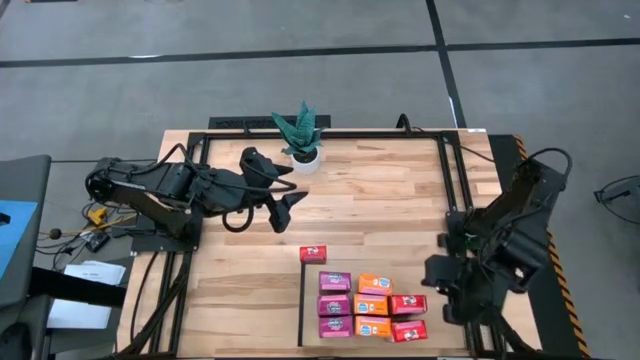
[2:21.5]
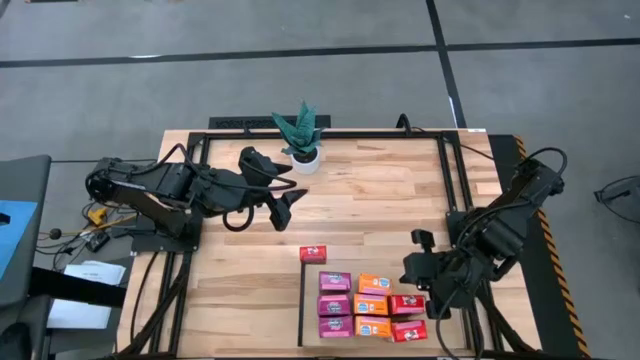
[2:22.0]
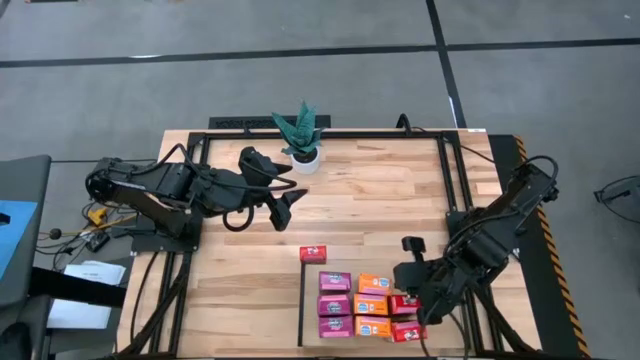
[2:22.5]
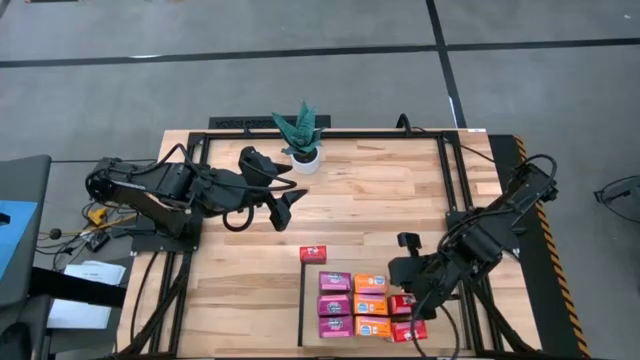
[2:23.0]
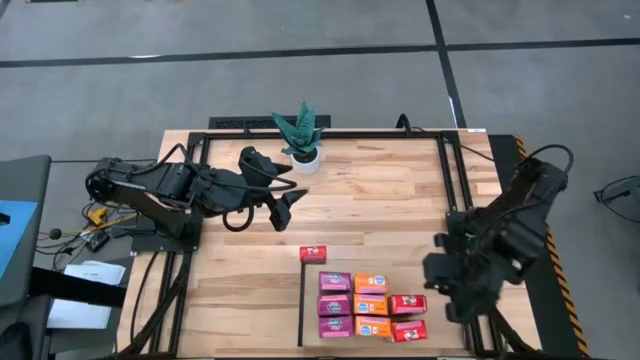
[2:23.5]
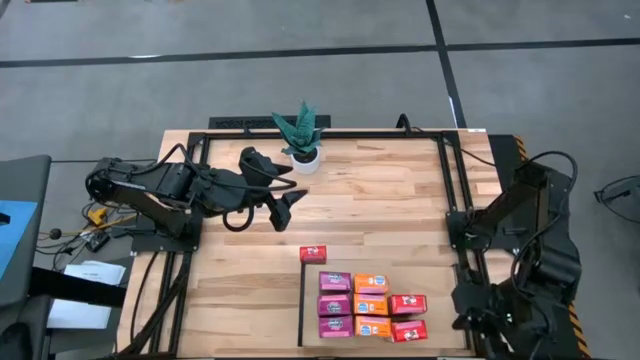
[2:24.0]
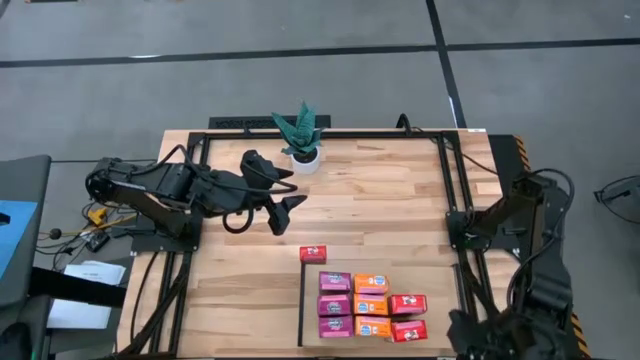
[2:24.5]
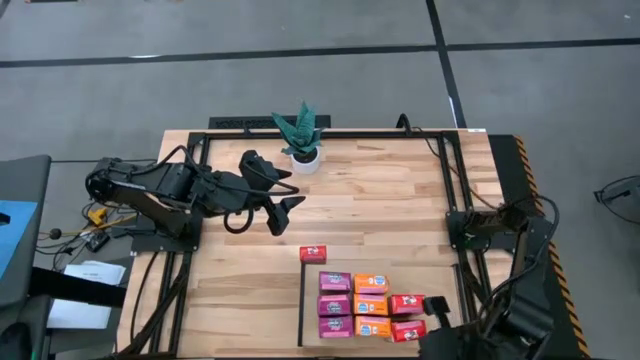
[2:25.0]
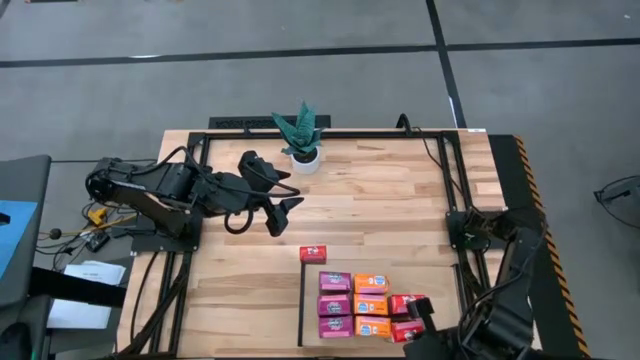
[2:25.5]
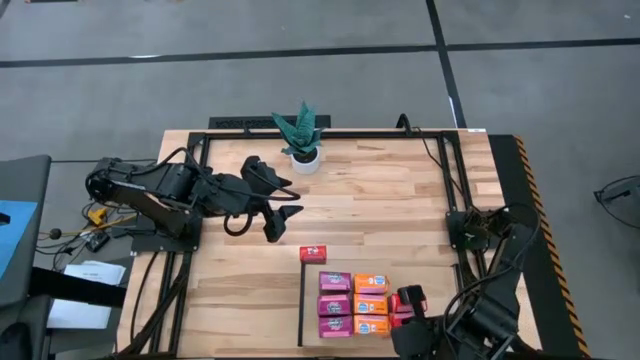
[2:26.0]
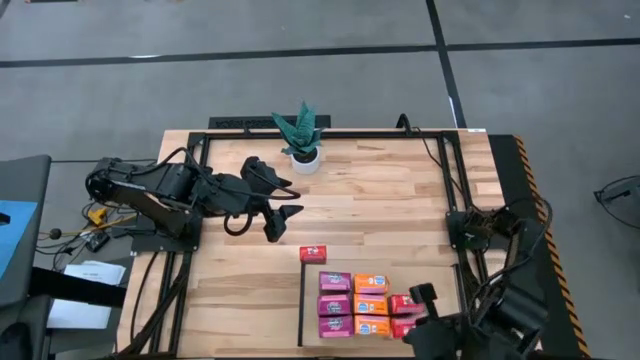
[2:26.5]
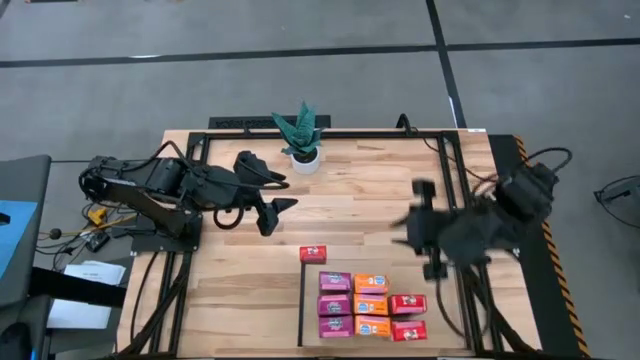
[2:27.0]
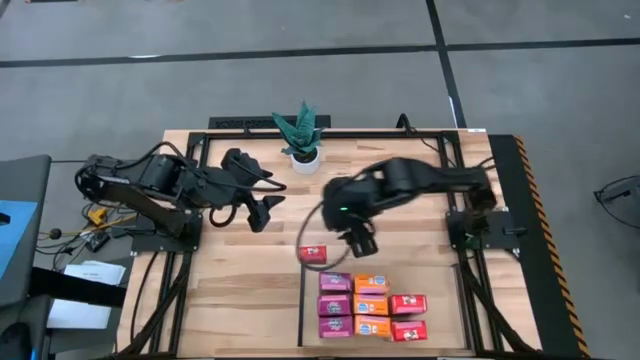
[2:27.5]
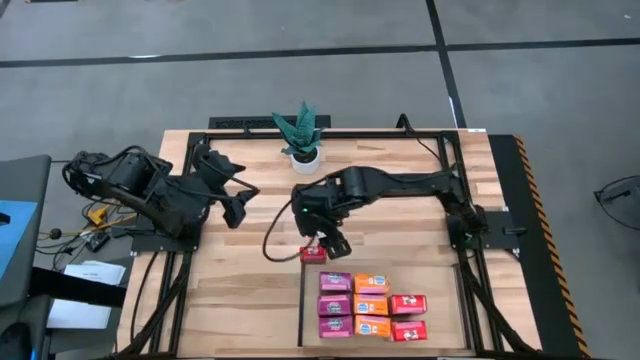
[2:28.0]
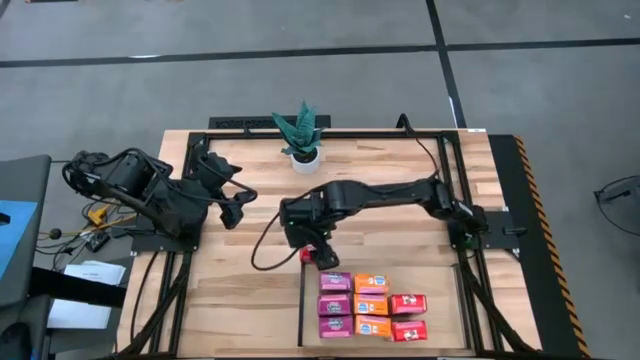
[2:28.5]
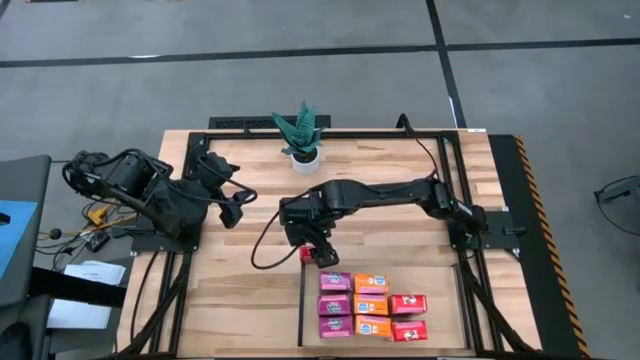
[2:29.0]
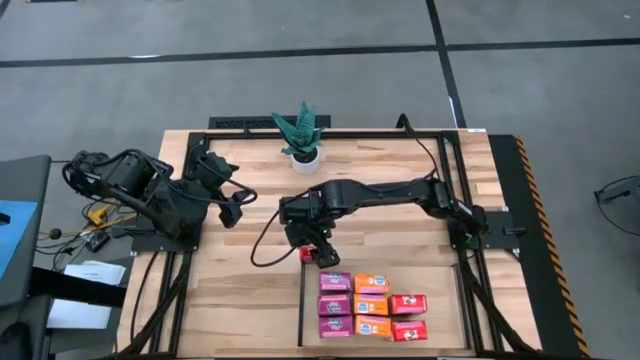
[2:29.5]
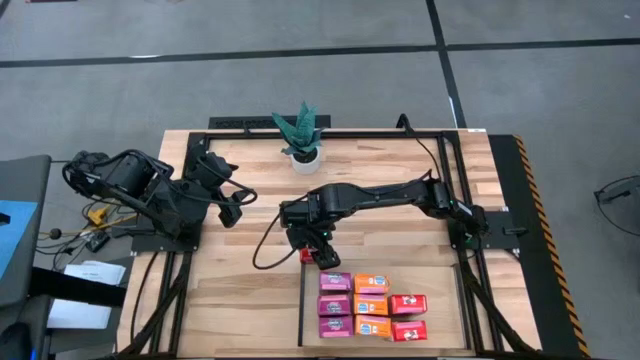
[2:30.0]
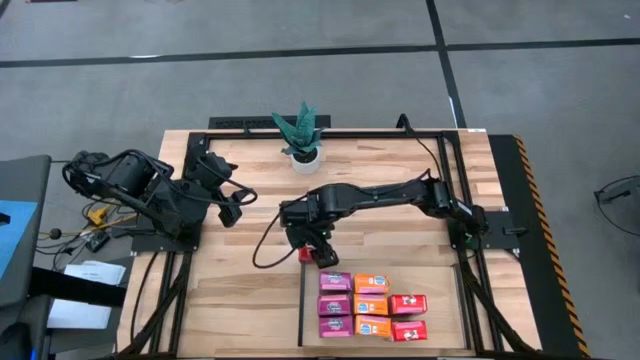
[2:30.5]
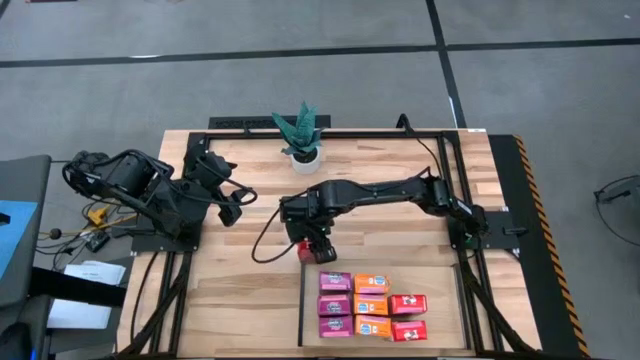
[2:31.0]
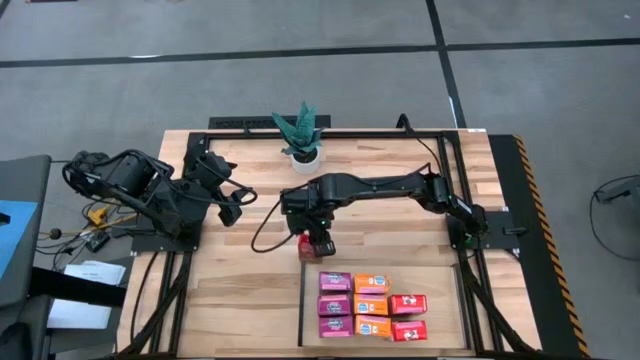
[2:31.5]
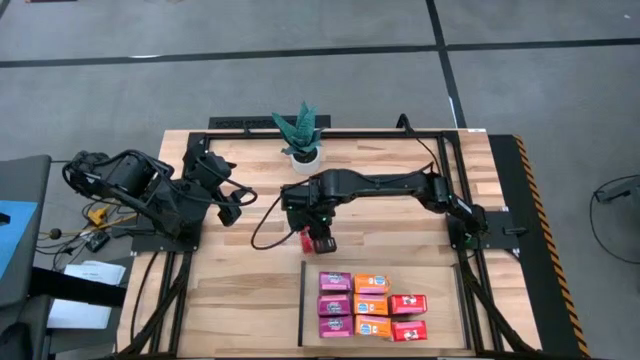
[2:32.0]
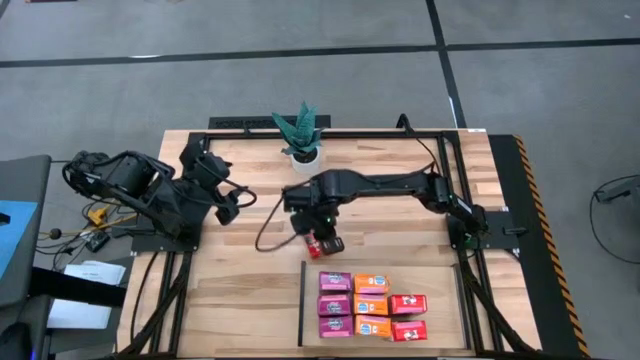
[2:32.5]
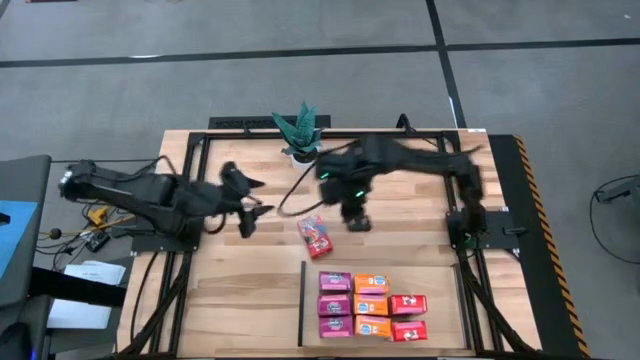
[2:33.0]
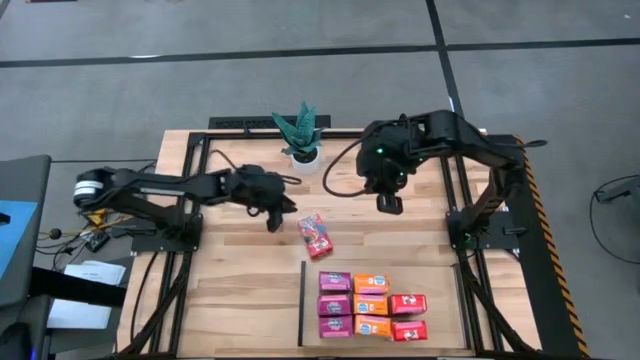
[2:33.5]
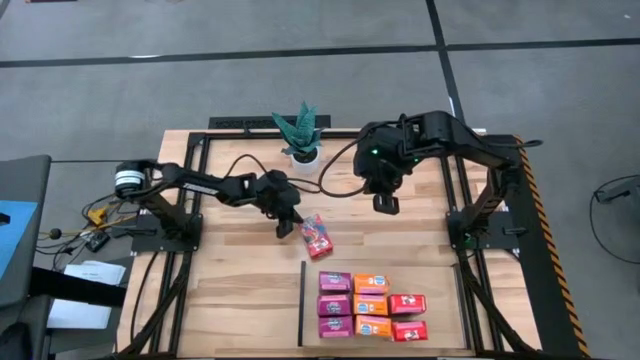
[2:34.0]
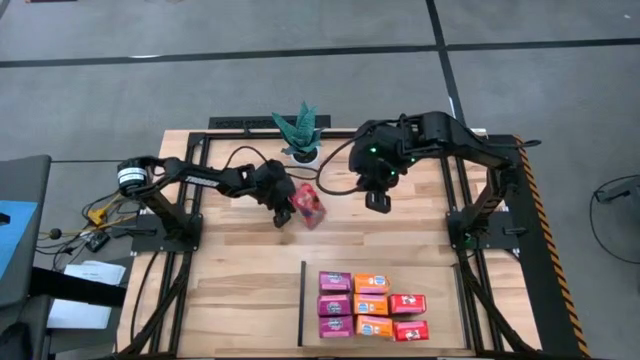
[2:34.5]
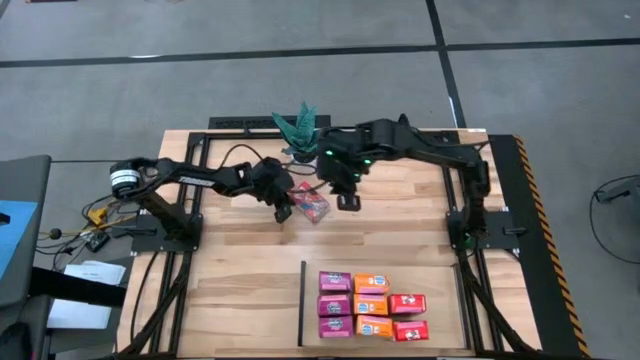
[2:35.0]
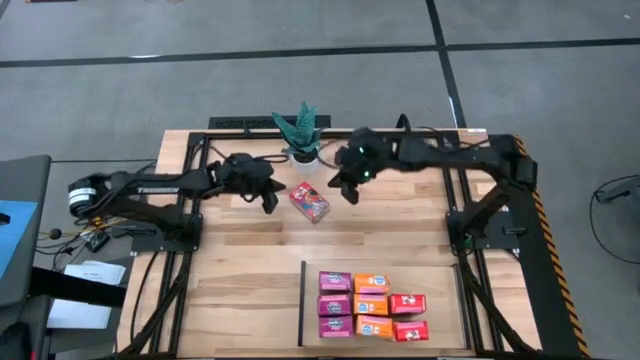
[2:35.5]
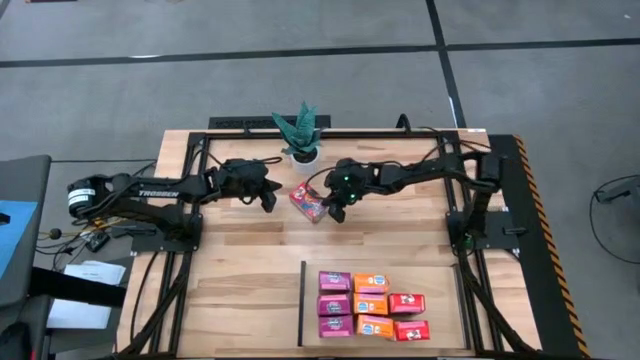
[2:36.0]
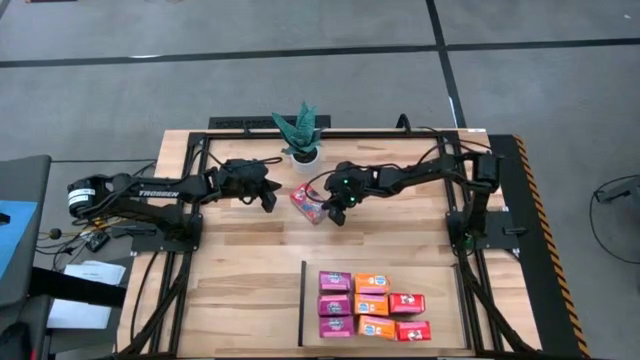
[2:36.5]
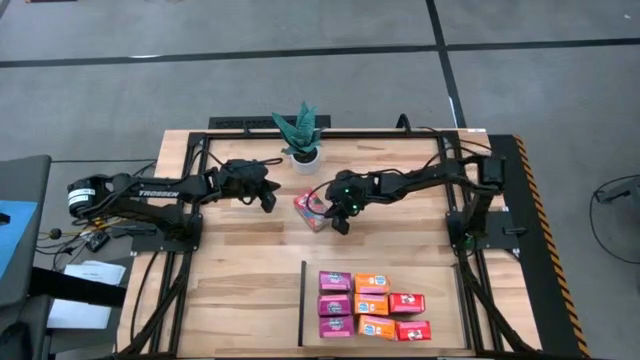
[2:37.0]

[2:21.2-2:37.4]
Task: Stack cereal on shelf
Put the red cereal box on the upper right shelf

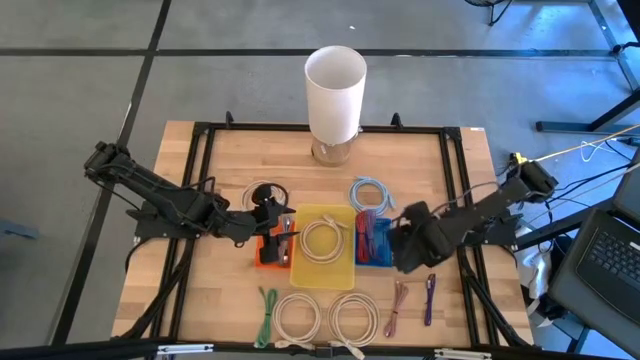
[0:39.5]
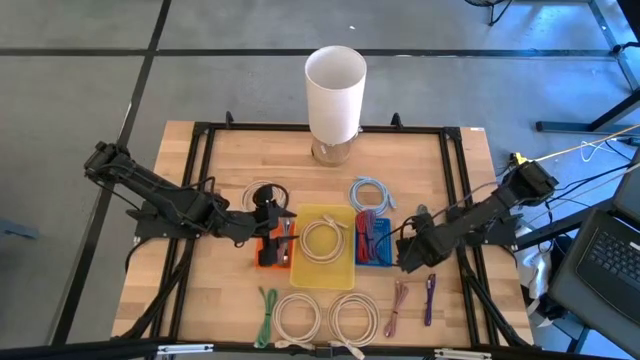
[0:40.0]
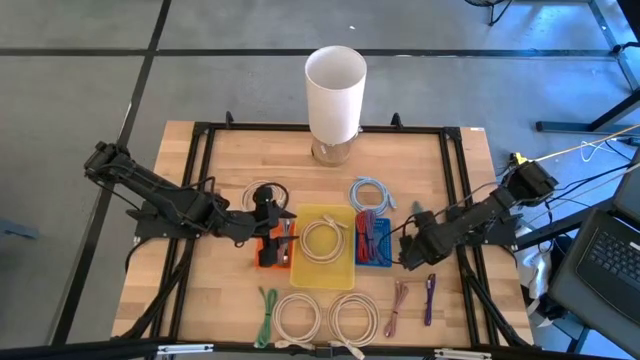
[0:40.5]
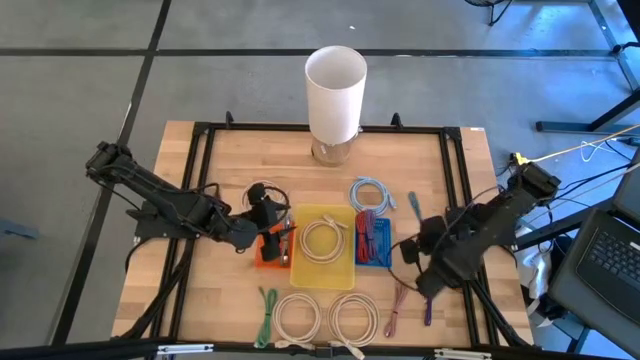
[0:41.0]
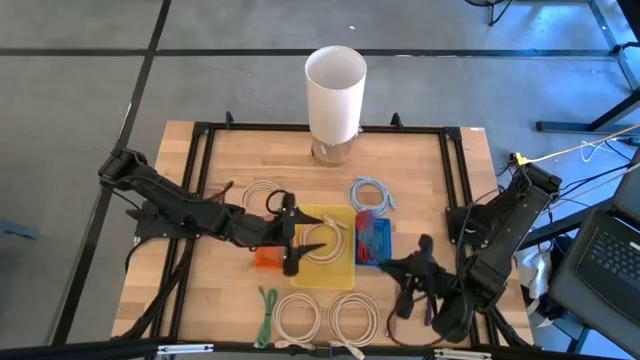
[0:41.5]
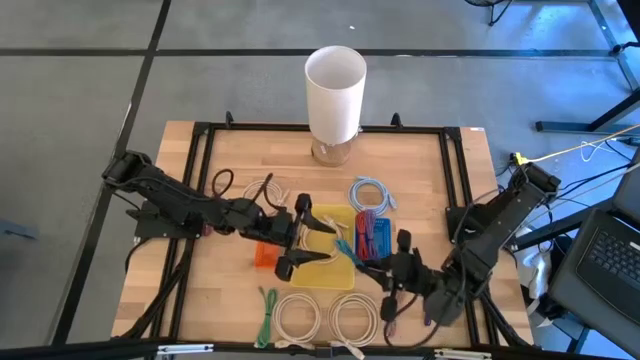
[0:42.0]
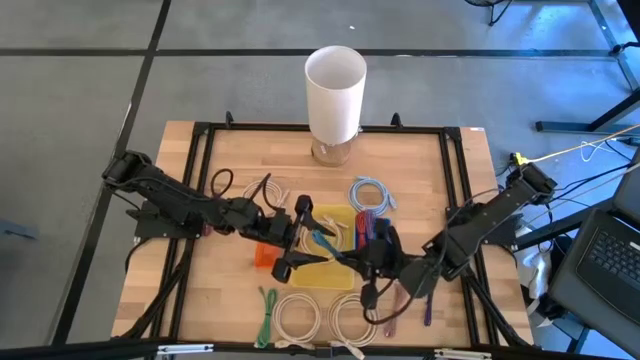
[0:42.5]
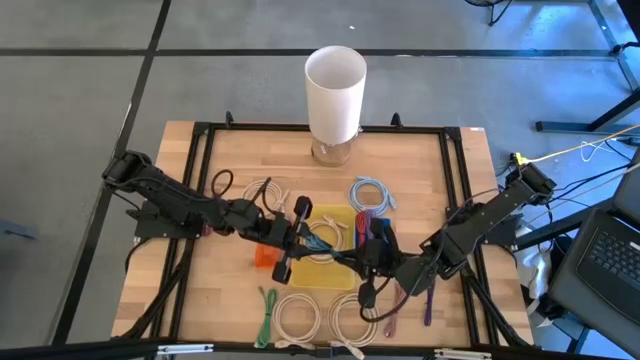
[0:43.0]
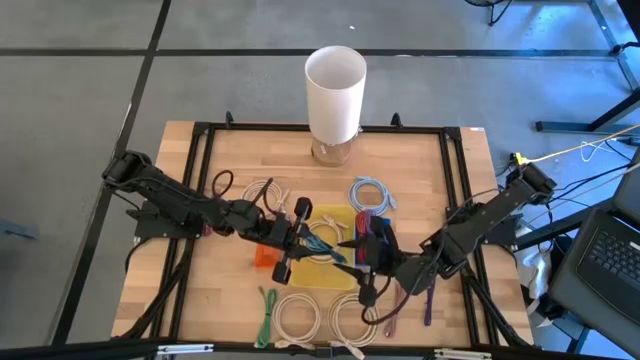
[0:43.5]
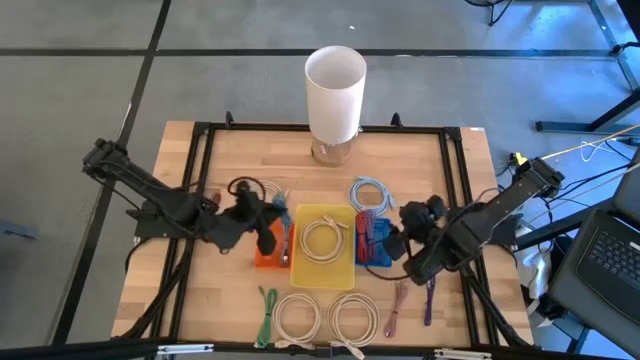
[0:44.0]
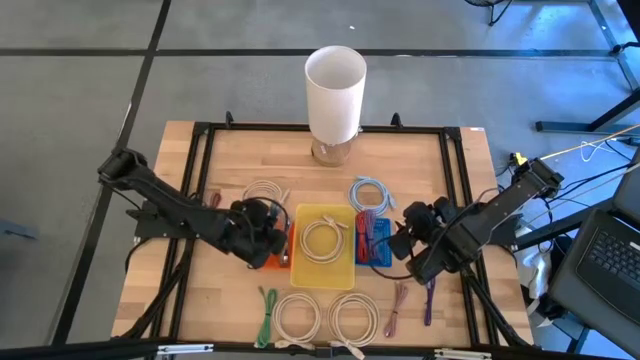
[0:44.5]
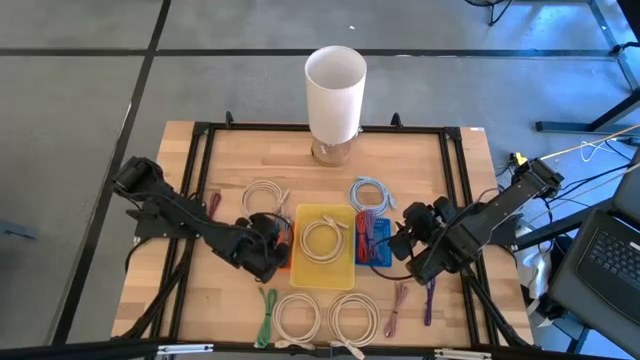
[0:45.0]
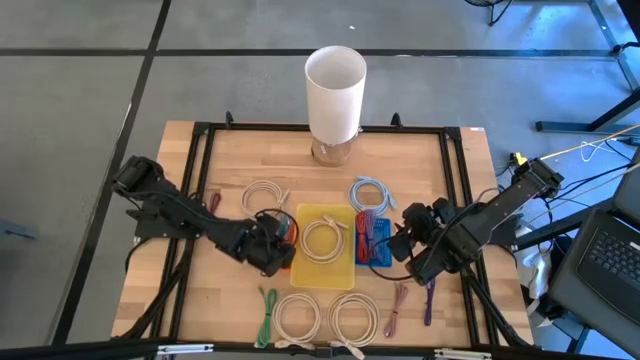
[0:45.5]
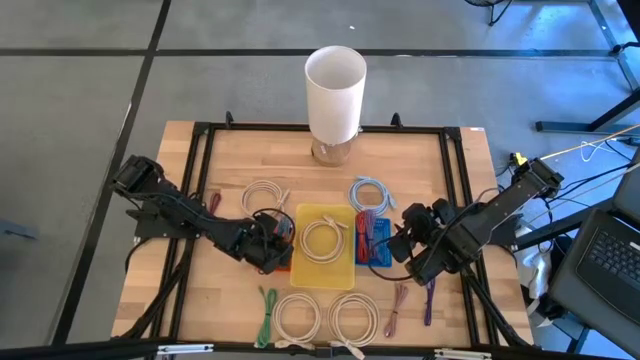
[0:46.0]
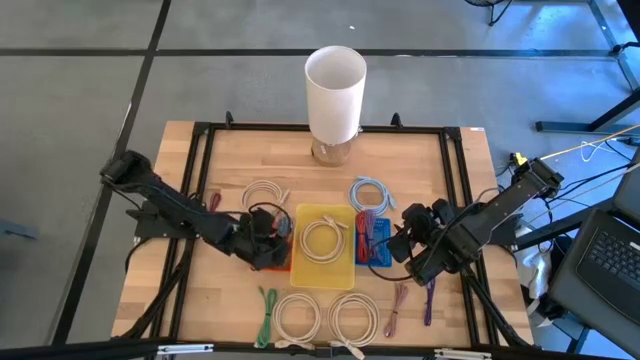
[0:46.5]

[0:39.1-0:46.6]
Task: Pick & Place USB Port
Put the black and blue charger cable into the orange bin
